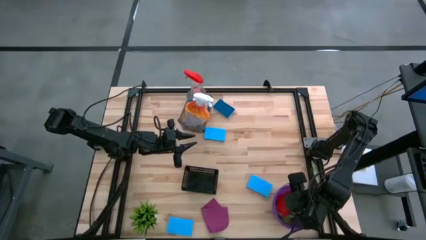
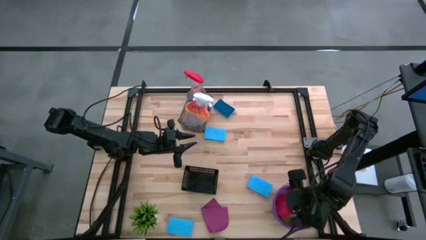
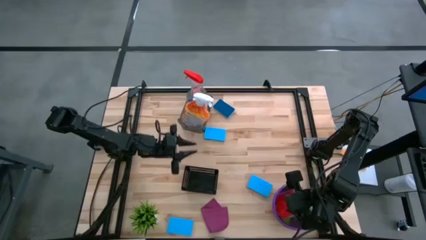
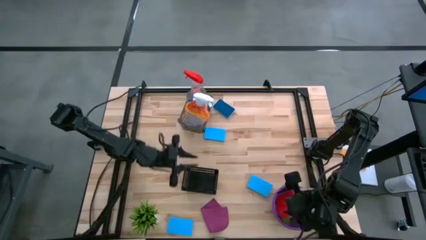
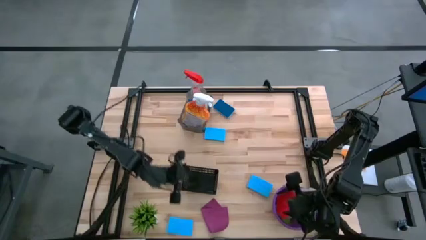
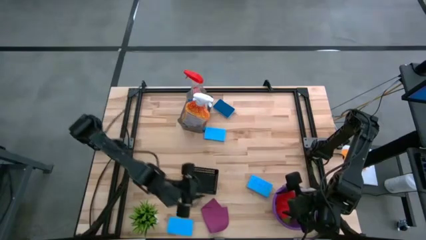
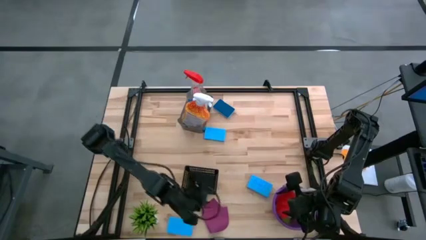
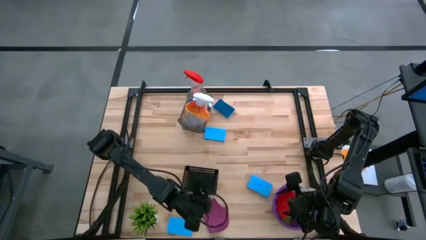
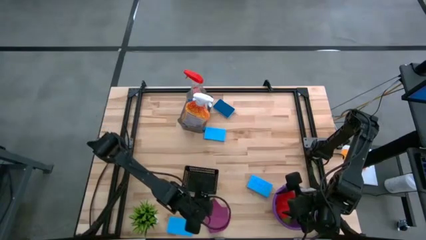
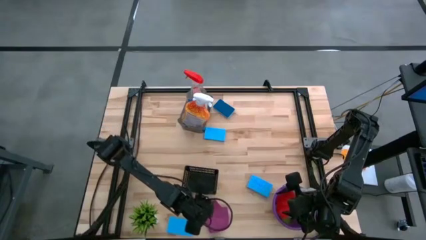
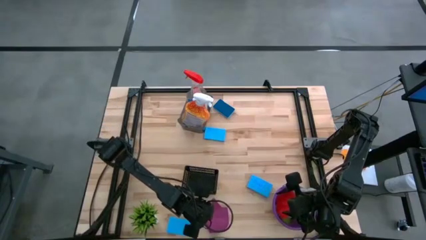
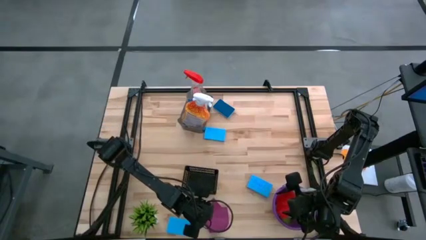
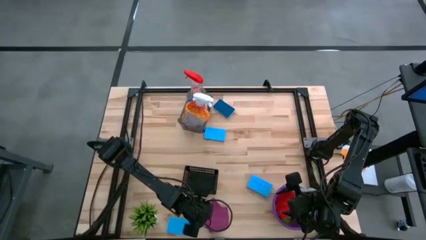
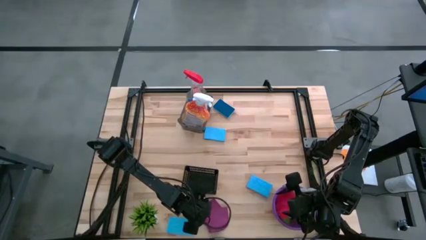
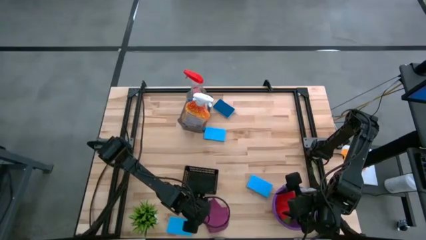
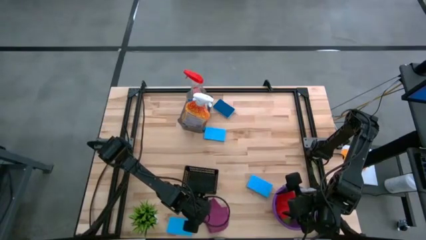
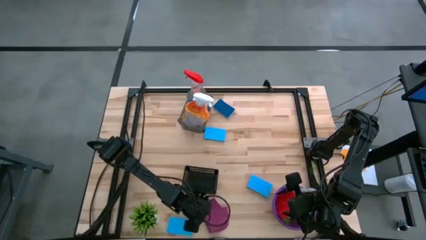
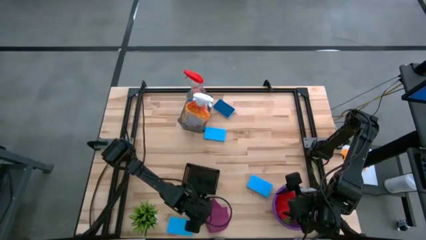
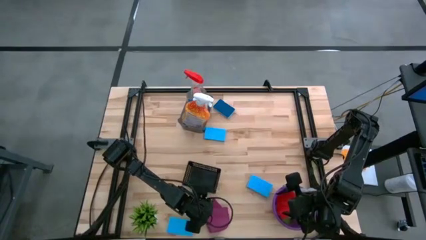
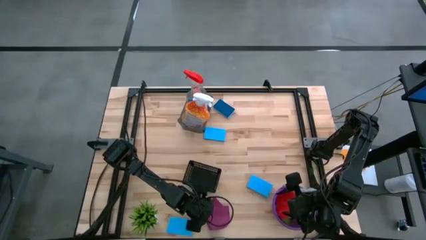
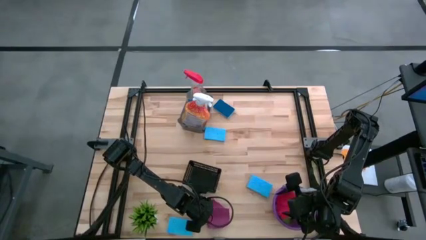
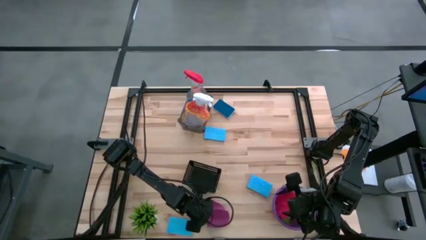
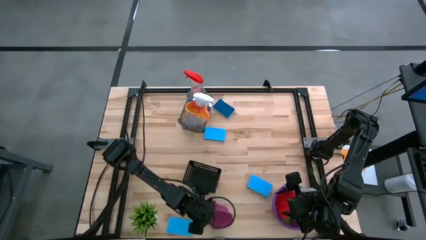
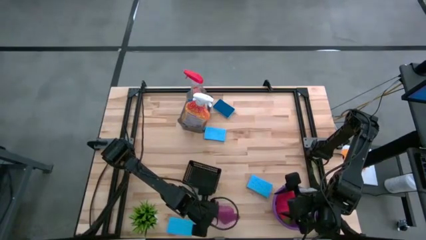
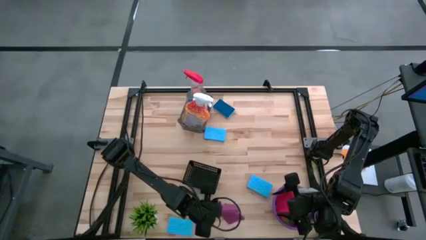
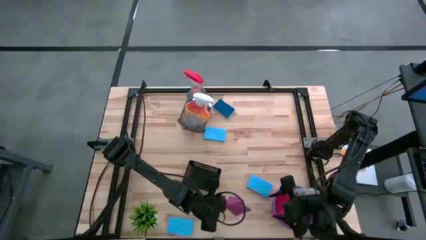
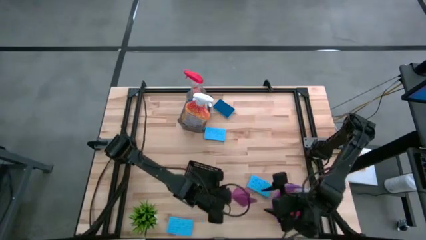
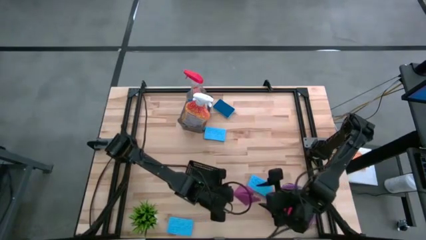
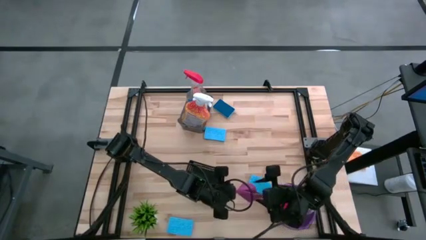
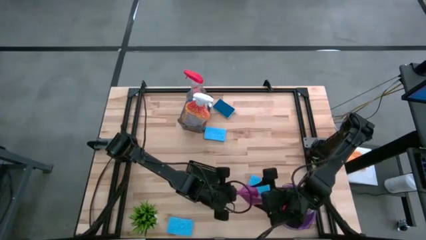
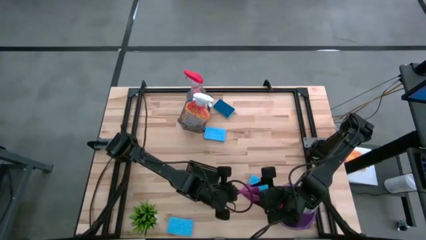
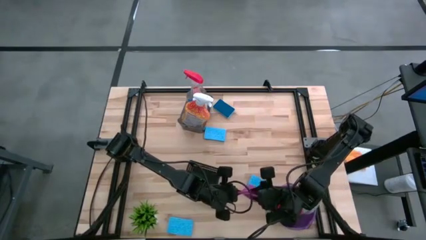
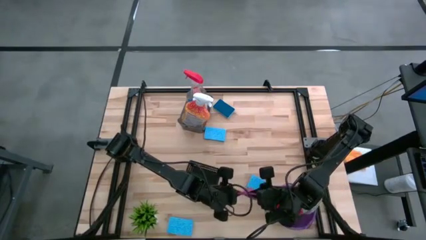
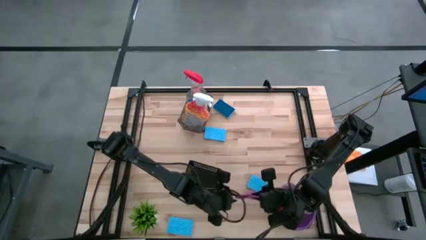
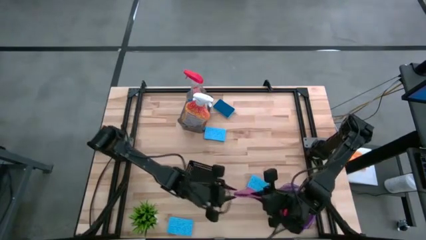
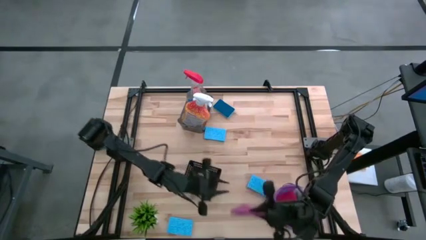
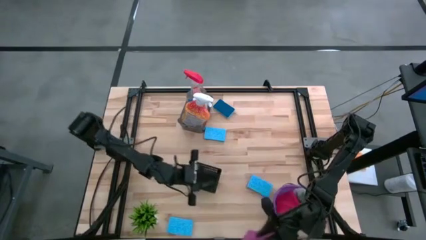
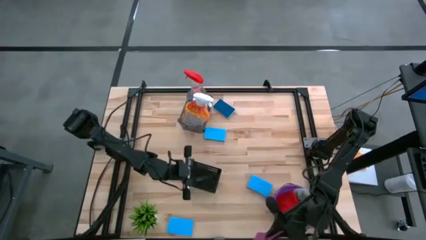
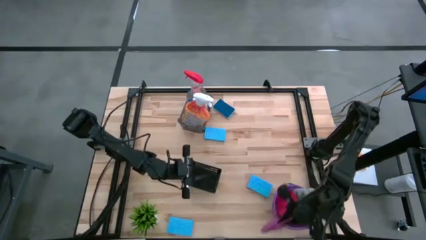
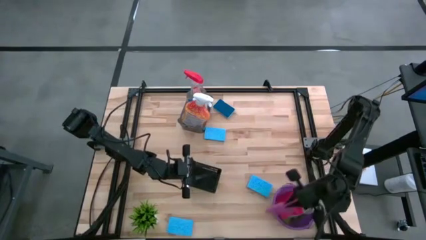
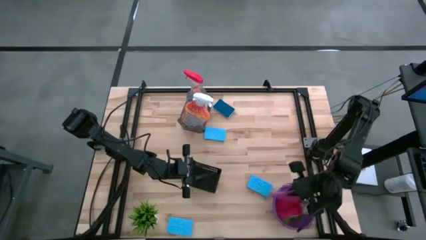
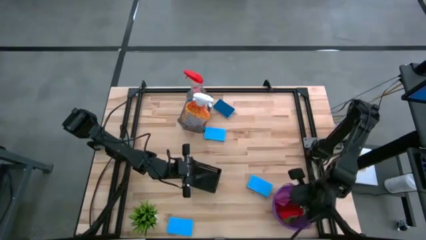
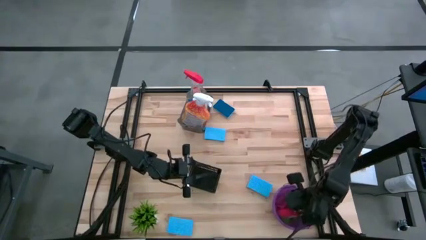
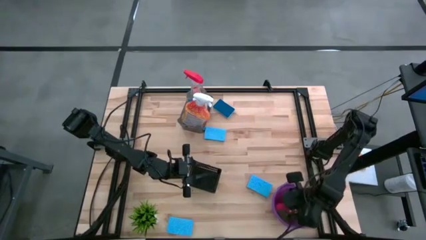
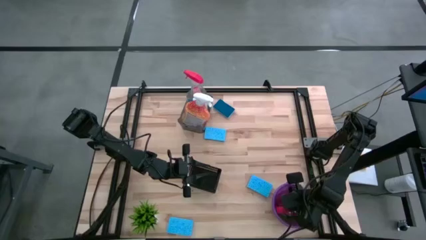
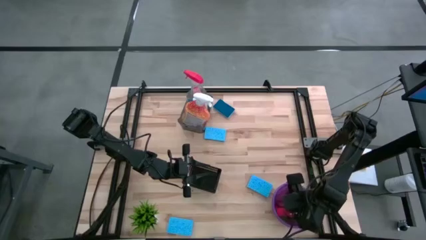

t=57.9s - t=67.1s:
Task: Pick & Place Kitchen Items
Put the violet towel into the violet bucket

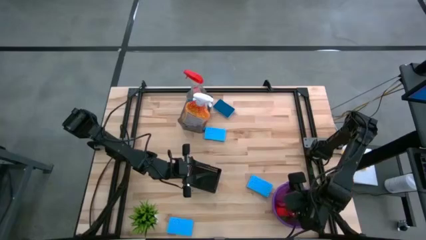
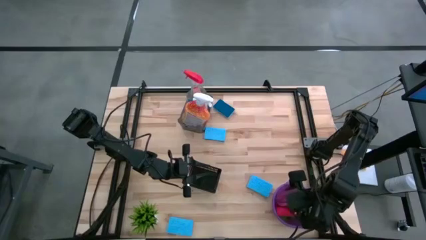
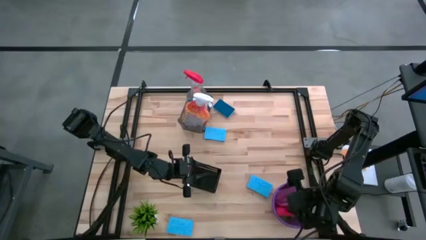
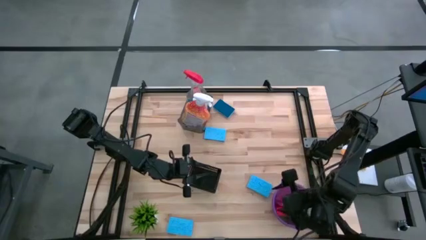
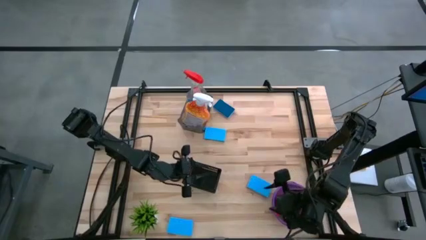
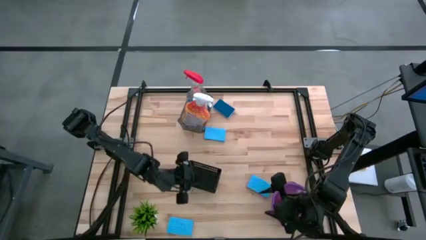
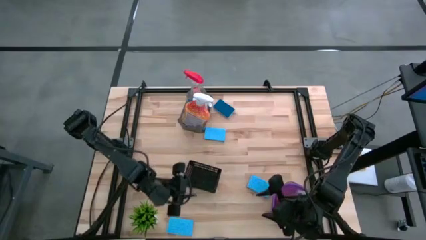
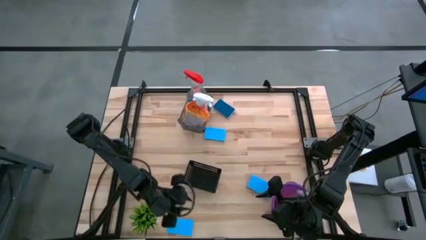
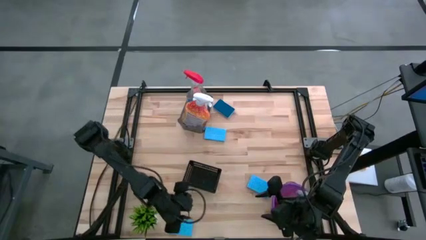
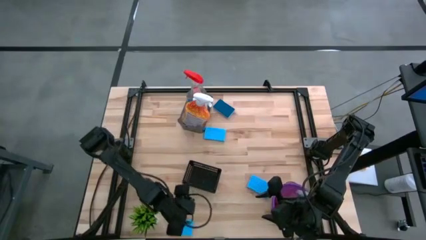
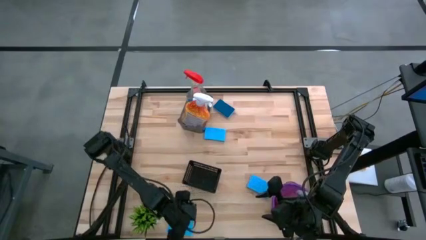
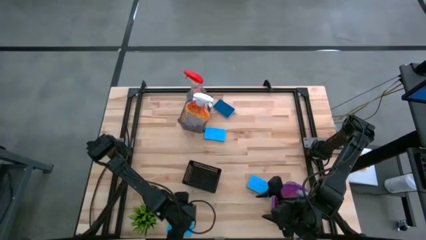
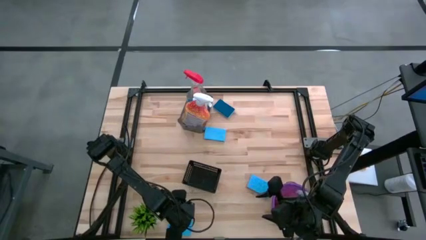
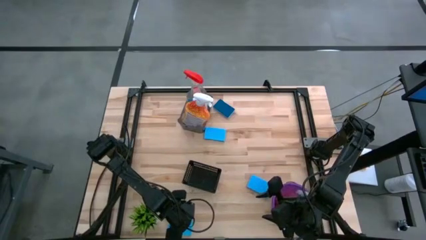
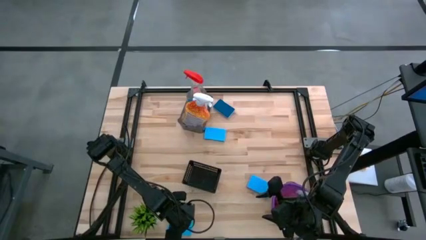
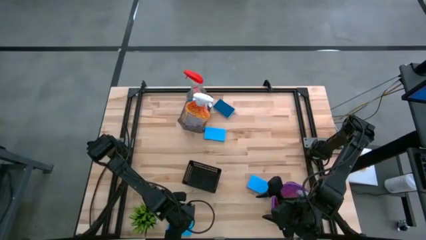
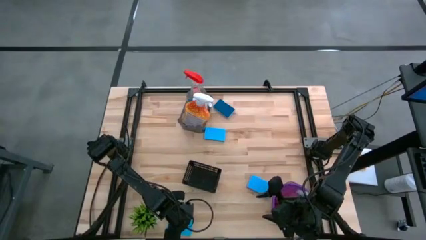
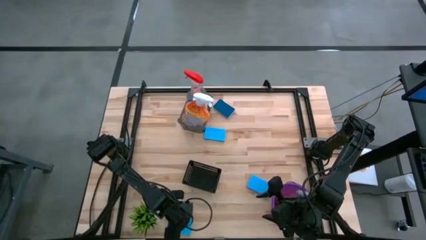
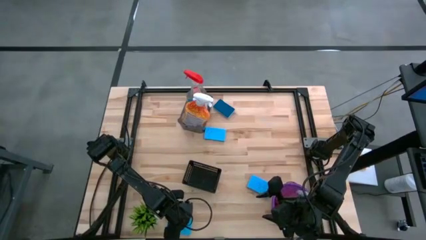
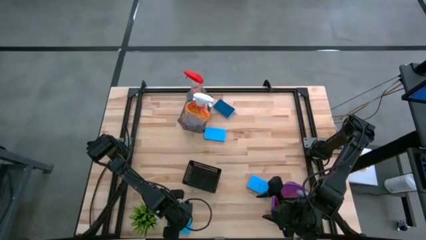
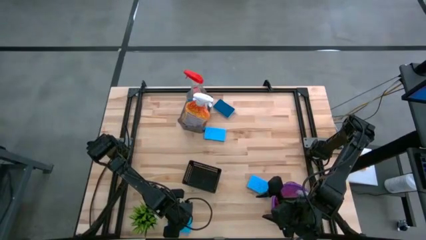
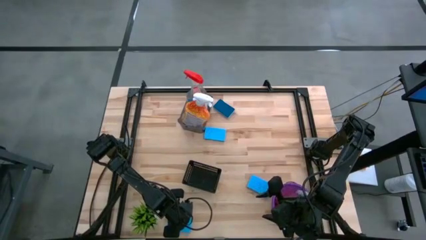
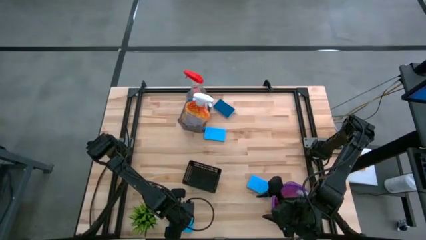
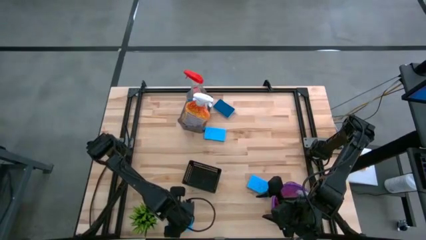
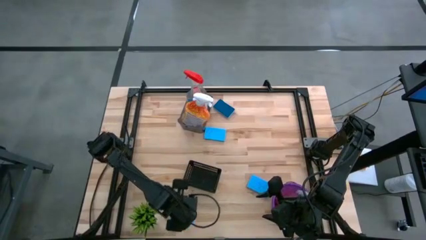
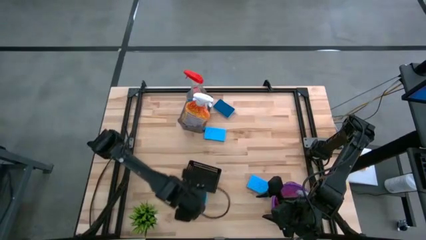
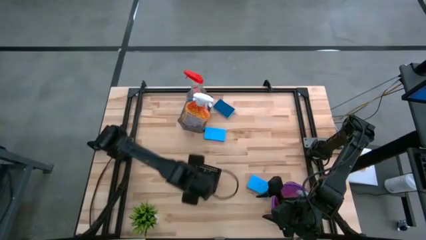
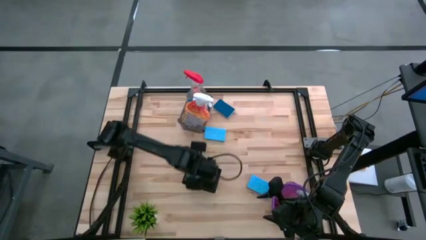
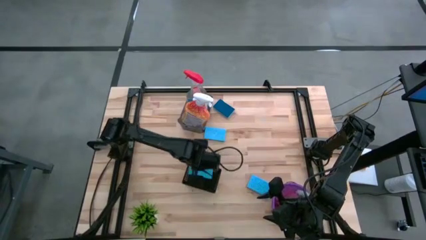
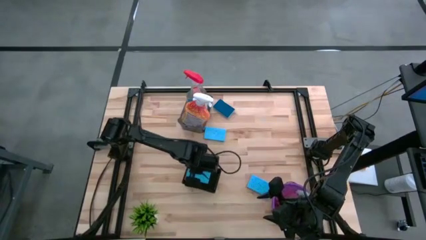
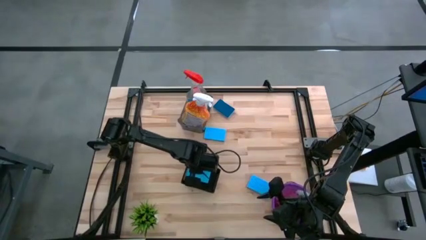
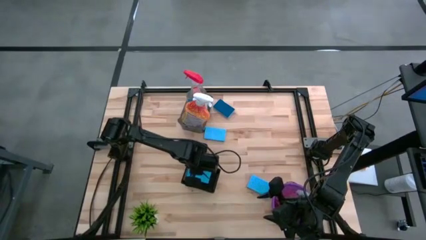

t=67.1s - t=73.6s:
Put the blue sponge into the black bin

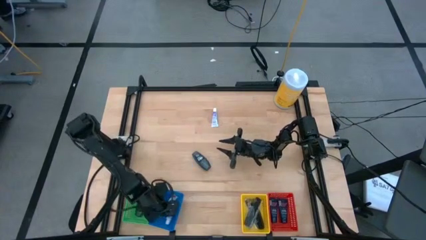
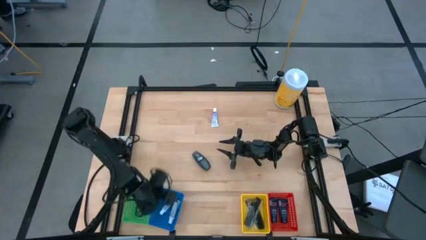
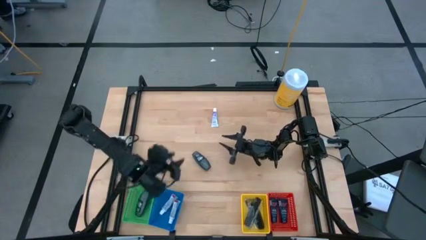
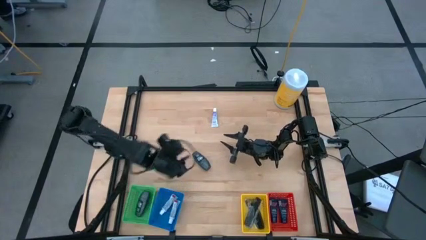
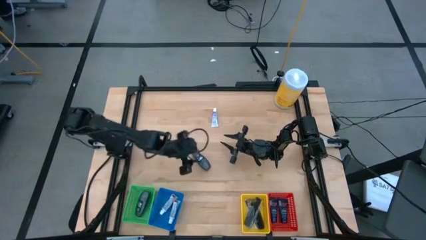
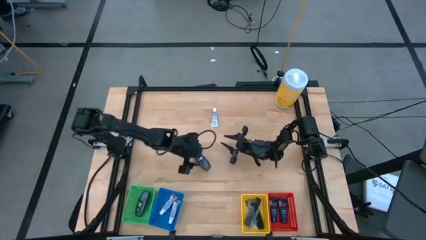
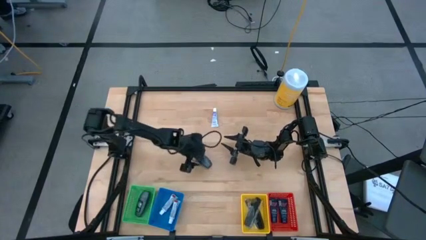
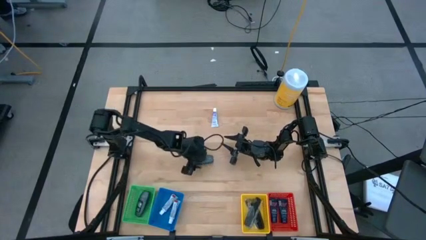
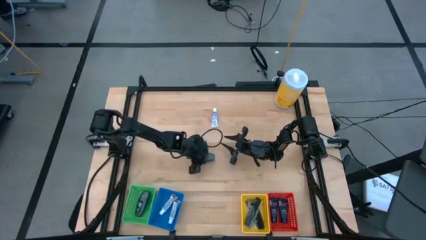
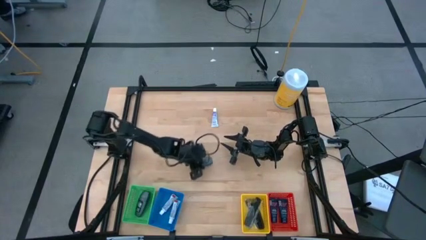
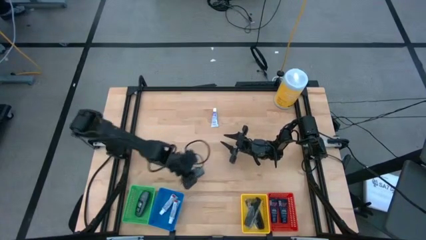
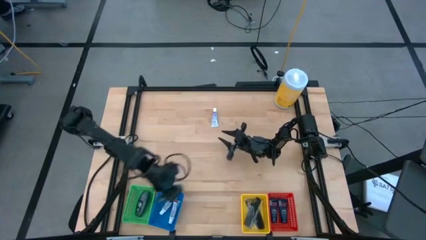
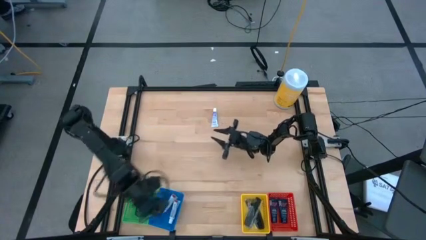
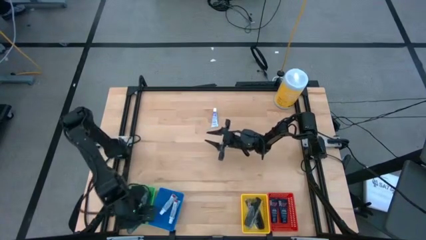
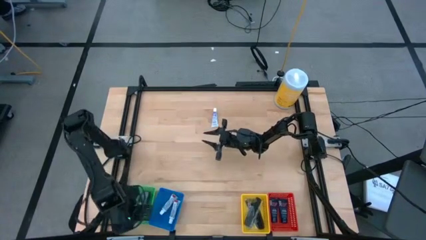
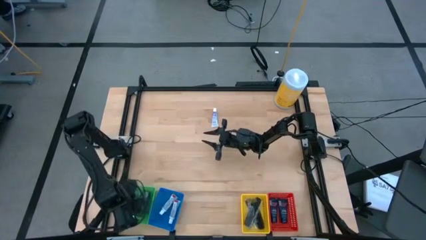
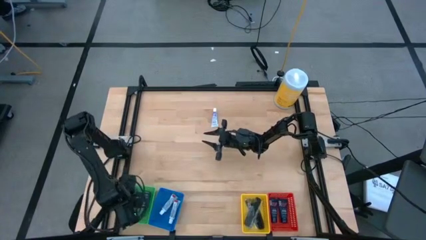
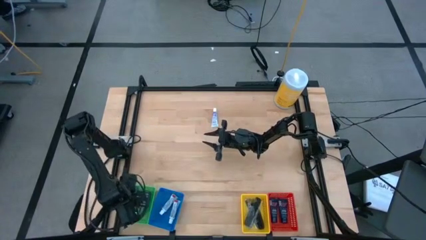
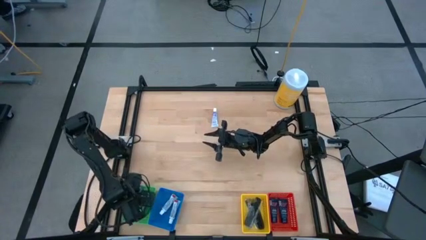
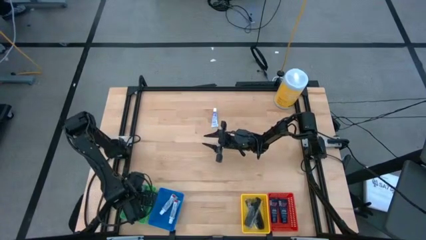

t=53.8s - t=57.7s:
Task: Pick & Place Travel size toiletries
Put the black deodorant into the green bin
